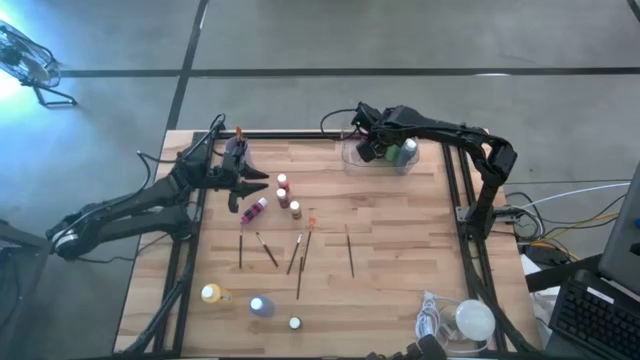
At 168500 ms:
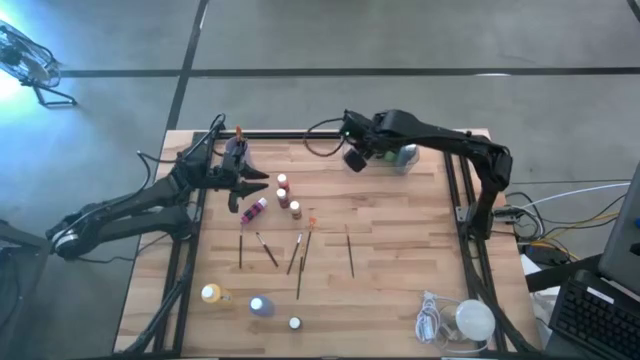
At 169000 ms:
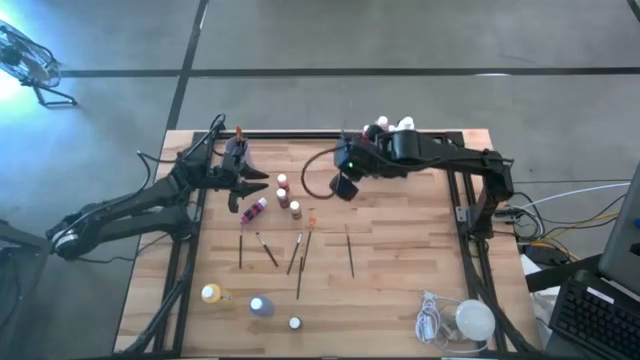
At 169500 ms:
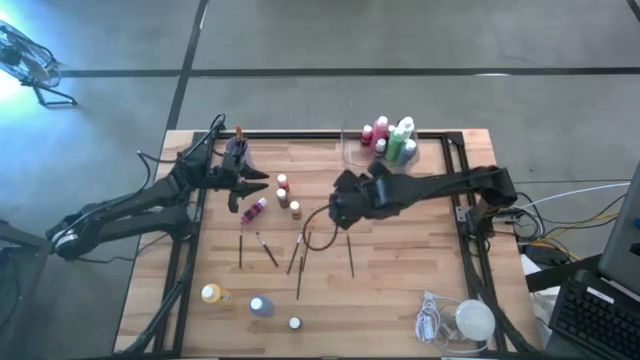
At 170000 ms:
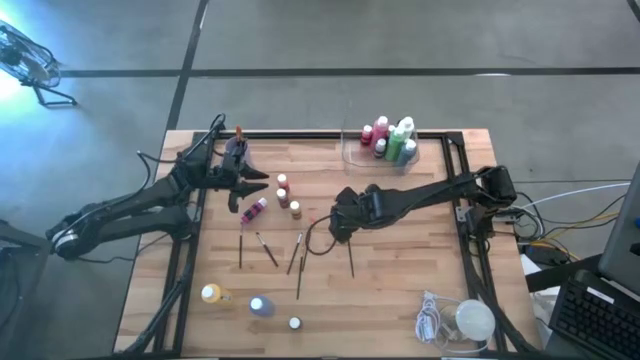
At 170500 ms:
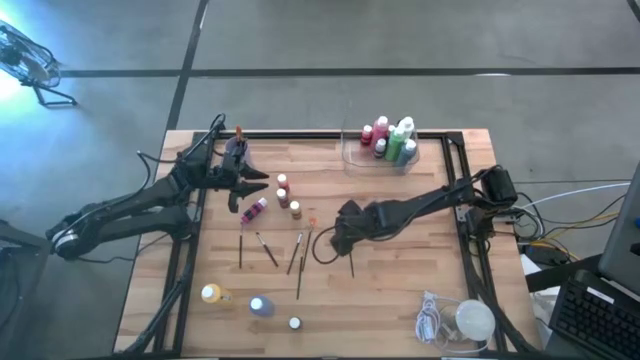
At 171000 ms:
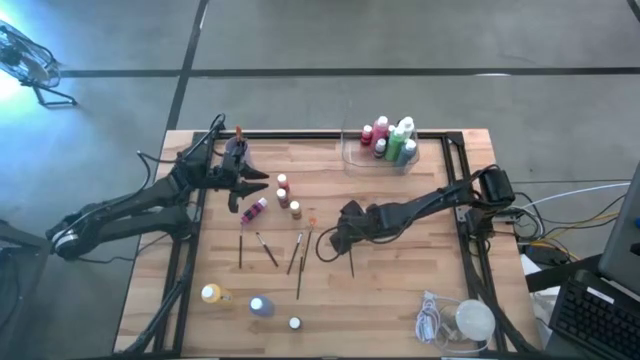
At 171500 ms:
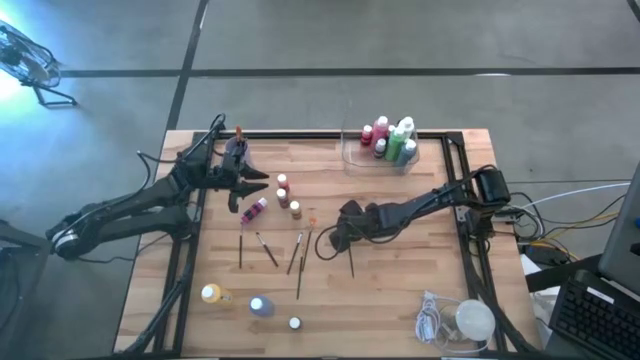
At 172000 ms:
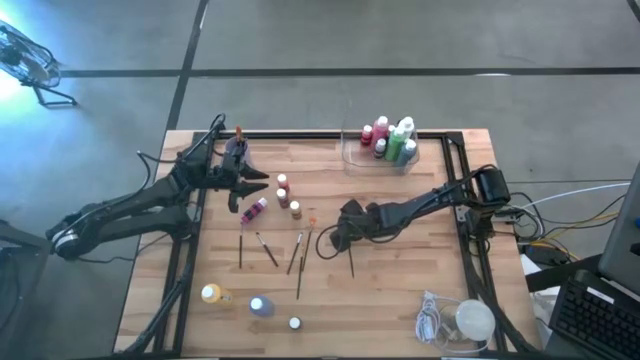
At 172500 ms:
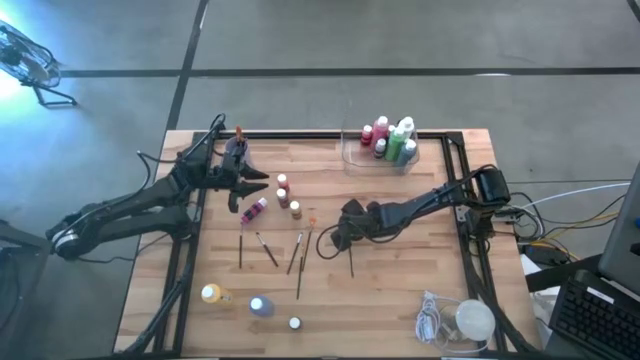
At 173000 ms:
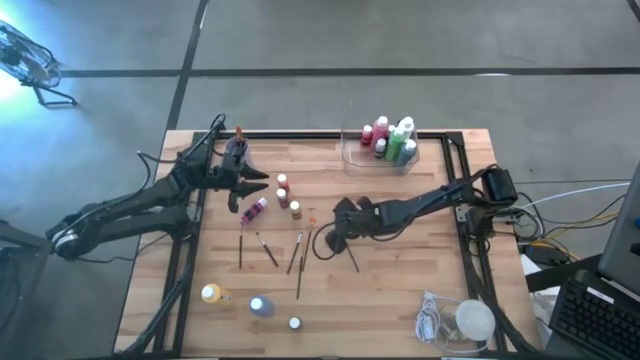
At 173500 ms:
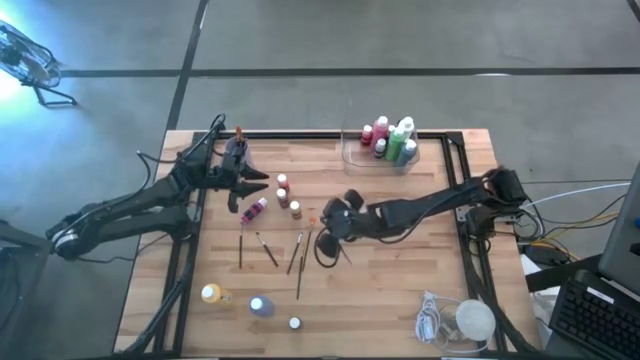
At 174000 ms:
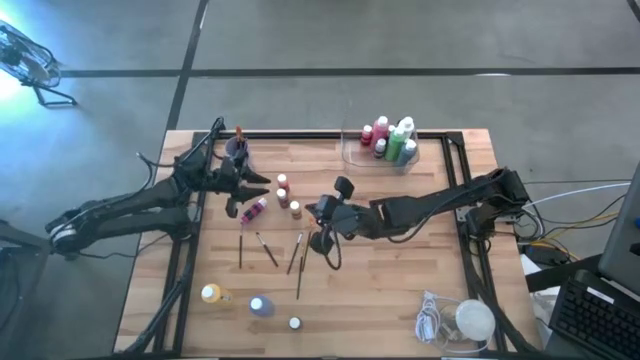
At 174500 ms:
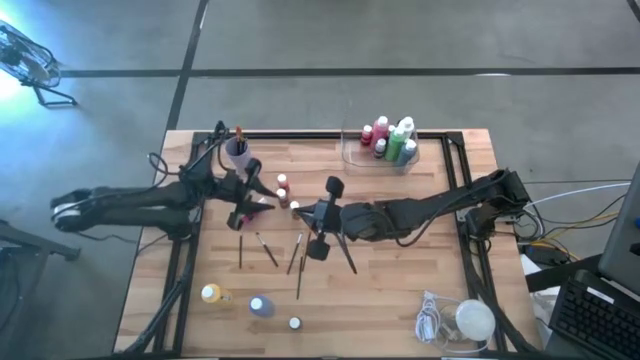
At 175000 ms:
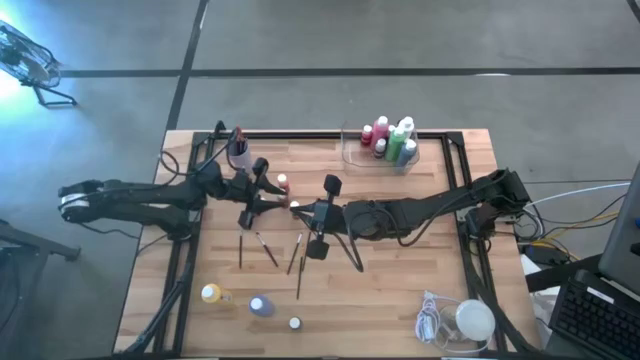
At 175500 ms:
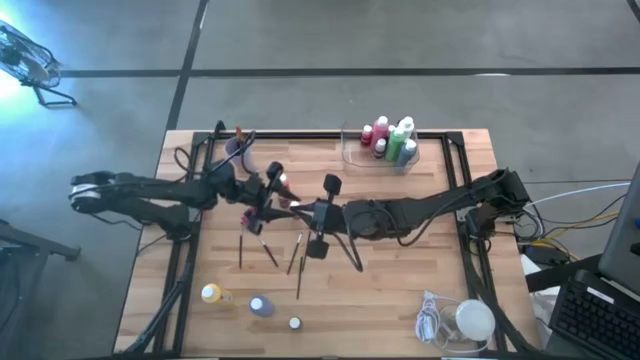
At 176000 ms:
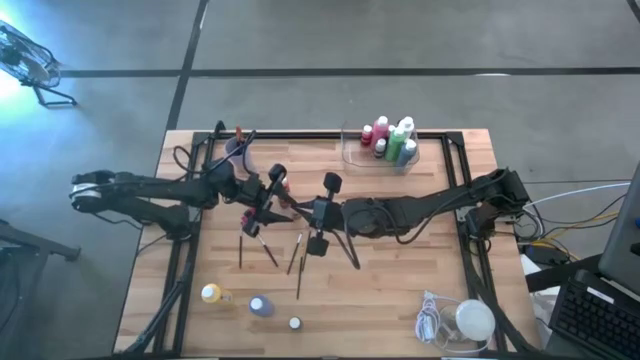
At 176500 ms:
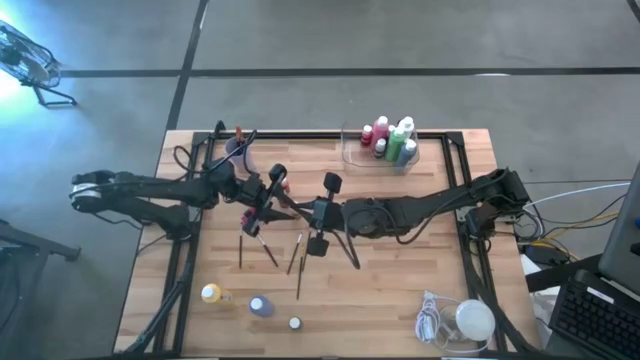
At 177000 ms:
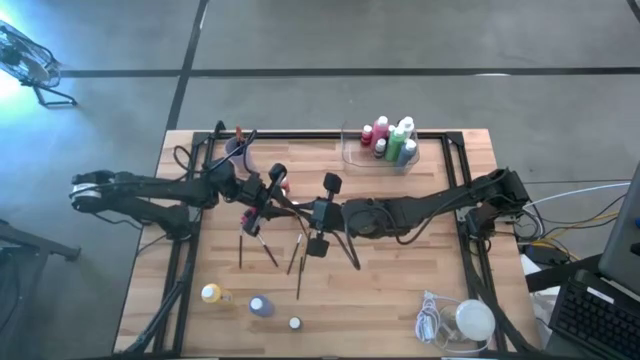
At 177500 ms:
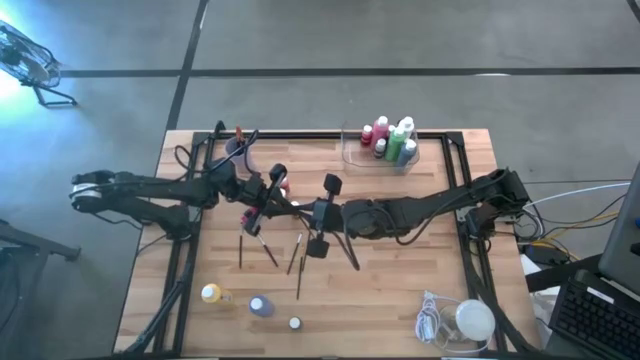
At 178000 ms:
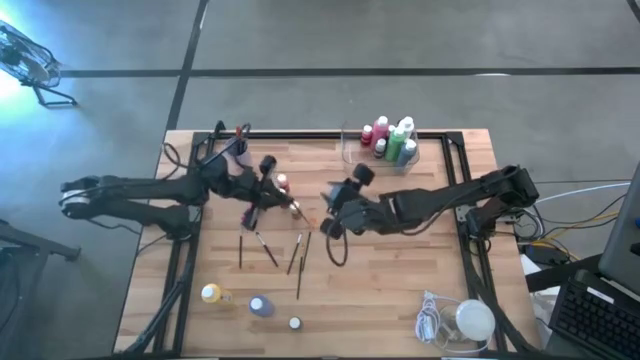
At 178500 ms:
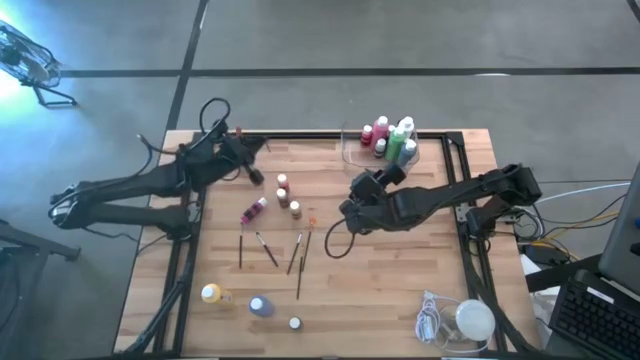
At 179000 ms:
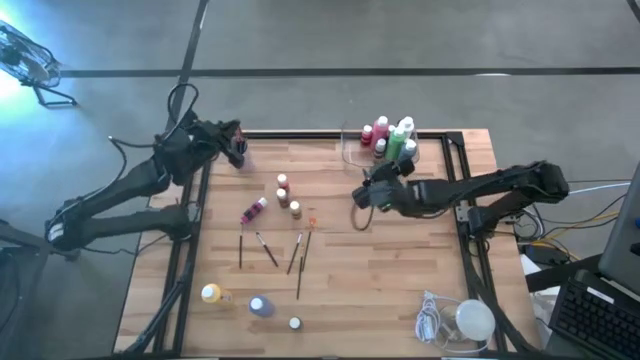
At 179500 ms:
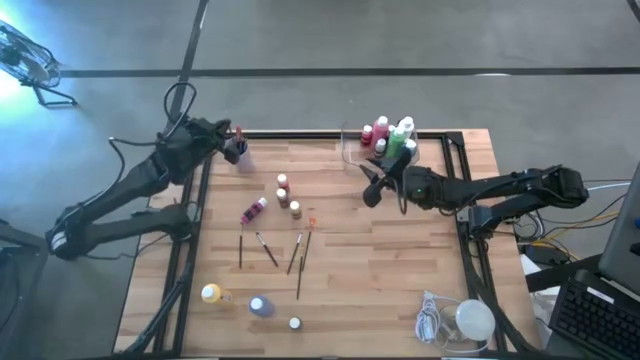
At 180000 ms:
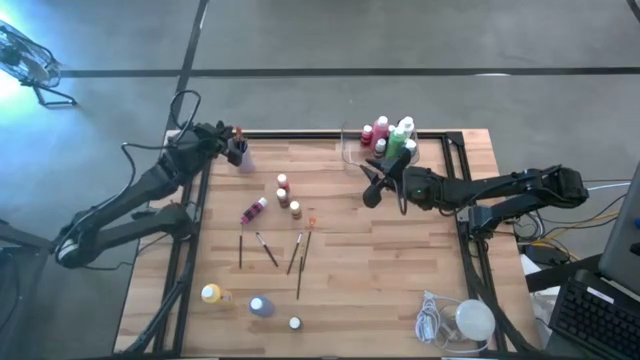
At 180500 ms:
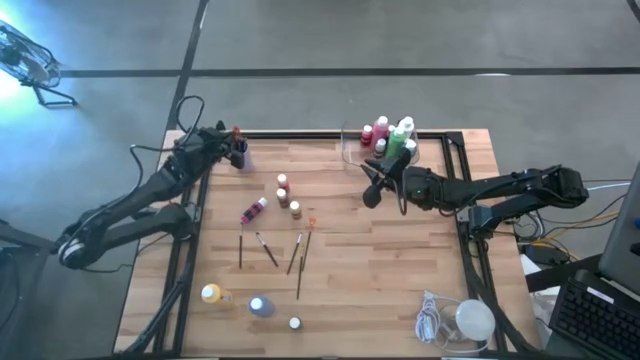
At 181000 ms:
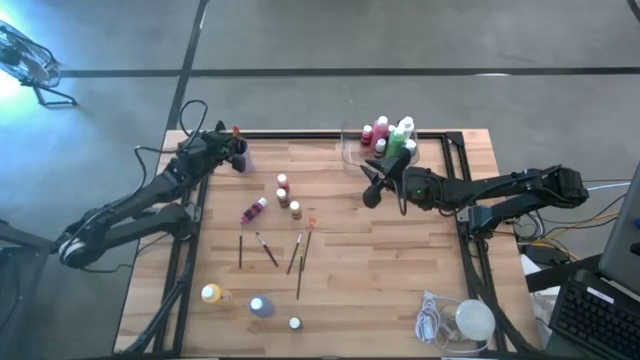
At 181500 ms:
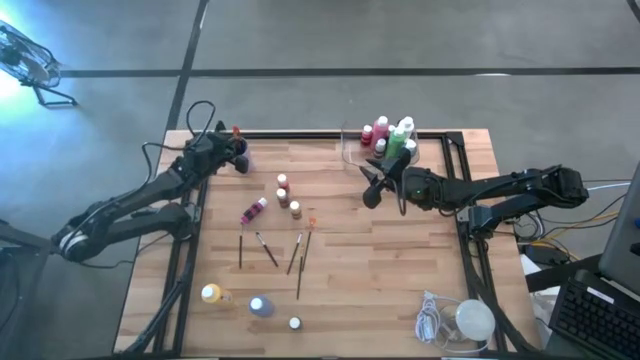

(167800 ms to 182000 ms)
Task: Pick & Place Paint Supplies
Put the gold paint brush into the violet cup

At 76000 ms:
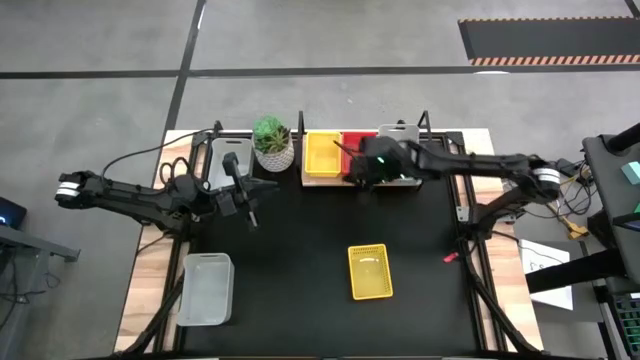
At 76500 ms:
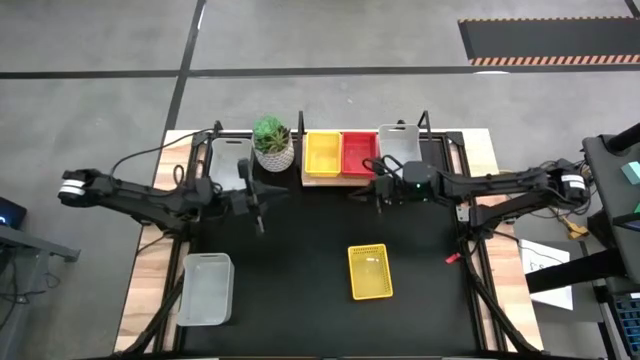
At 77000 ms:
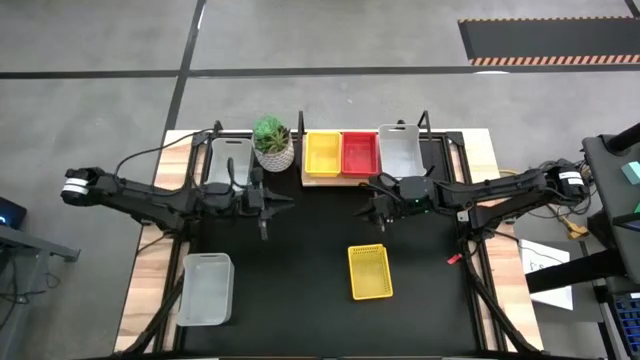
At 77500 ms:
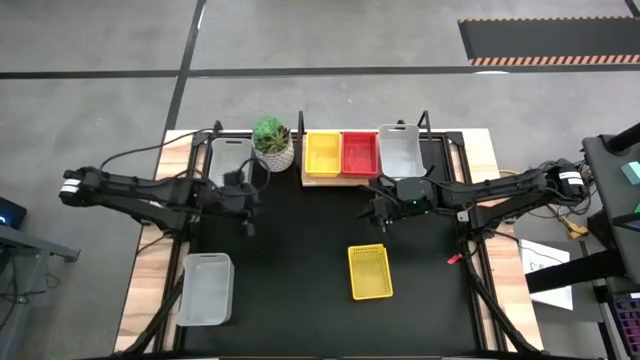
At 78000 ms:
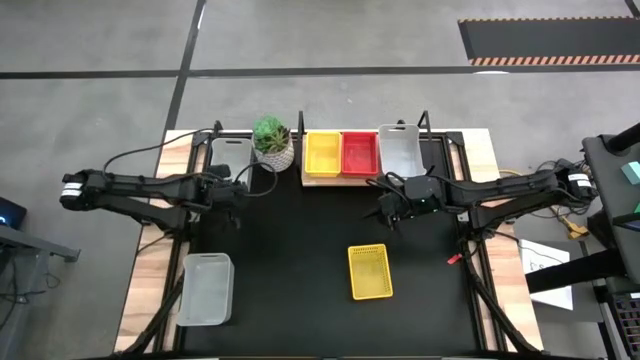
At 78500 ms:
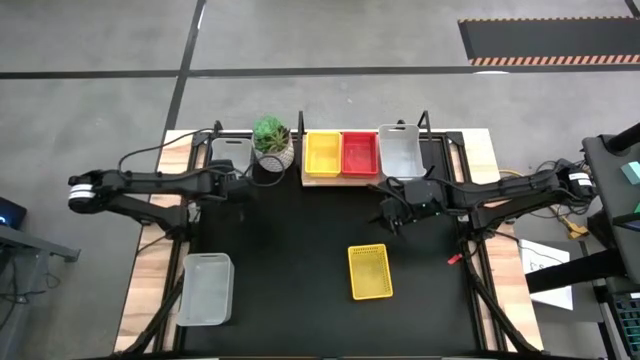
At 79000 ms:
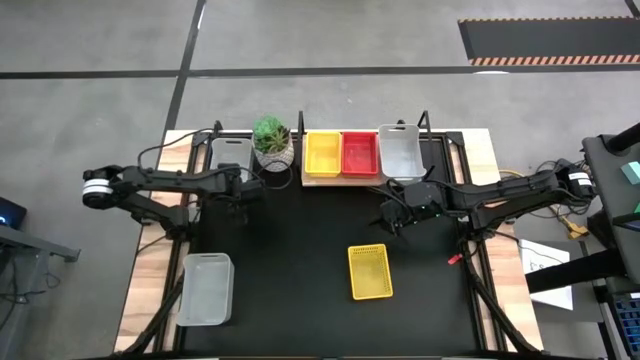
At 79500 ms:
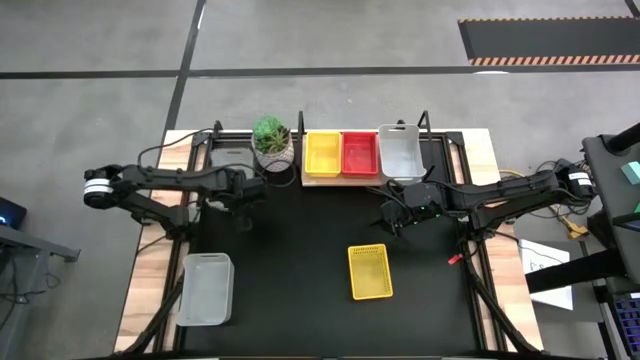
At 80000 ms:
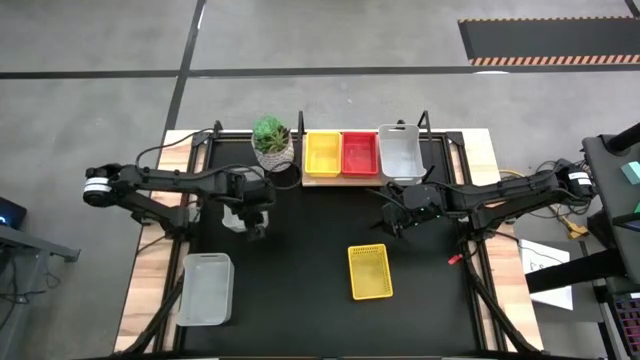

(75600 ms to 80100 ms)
Task: Stack baskets on shelf by color
Stack the top gray bin on top of gray bin on the shelf
